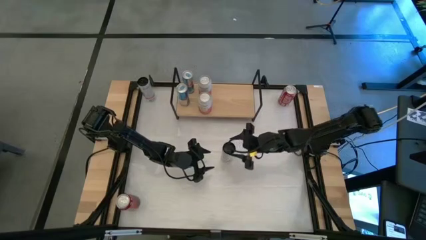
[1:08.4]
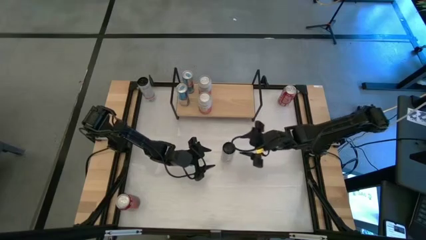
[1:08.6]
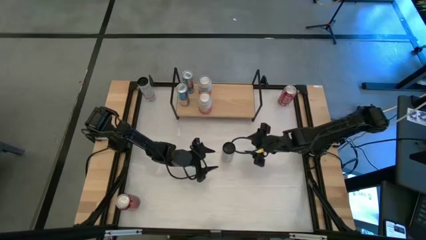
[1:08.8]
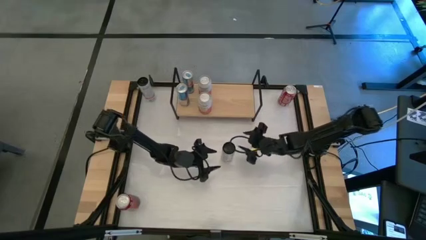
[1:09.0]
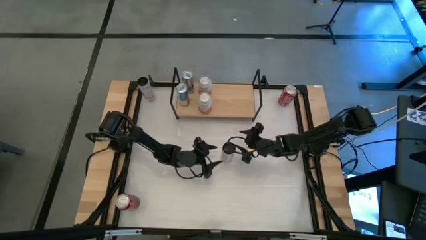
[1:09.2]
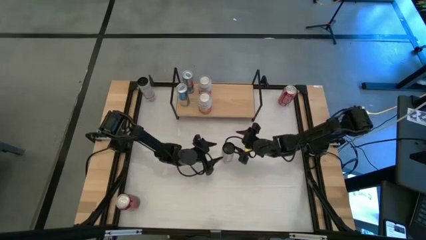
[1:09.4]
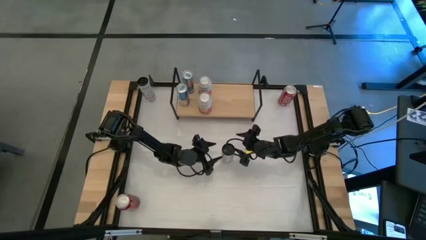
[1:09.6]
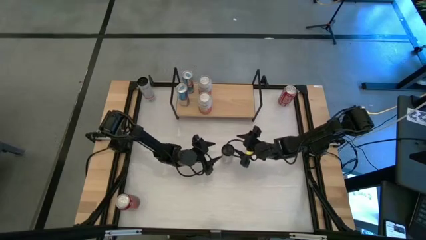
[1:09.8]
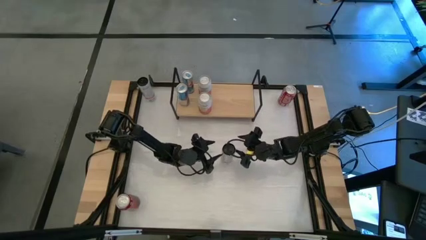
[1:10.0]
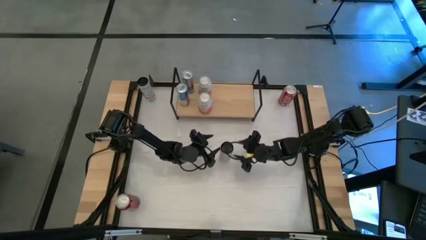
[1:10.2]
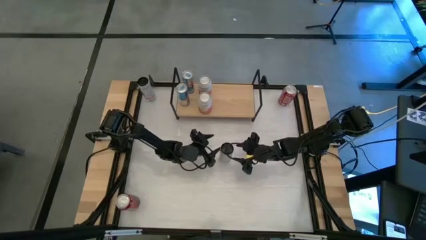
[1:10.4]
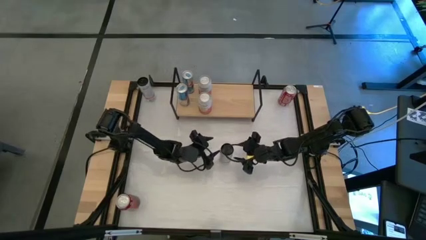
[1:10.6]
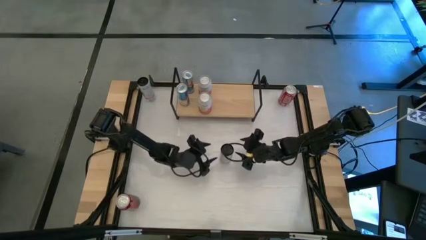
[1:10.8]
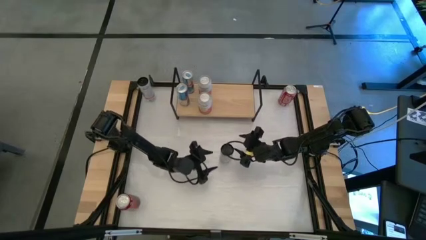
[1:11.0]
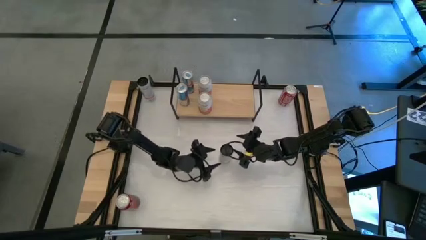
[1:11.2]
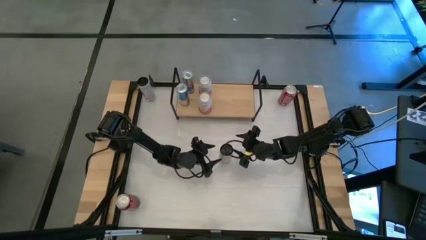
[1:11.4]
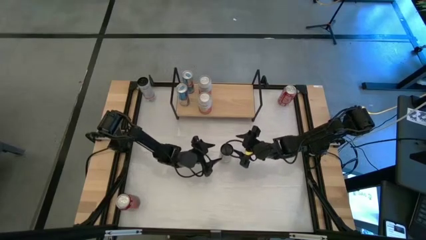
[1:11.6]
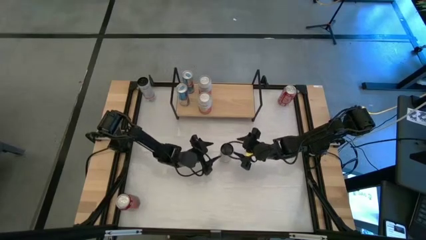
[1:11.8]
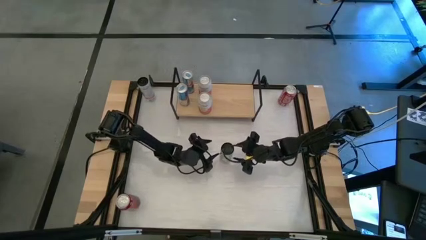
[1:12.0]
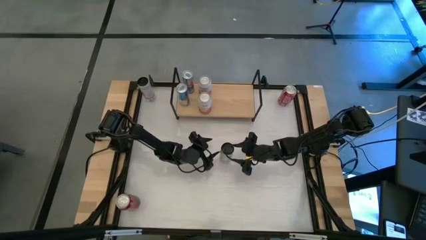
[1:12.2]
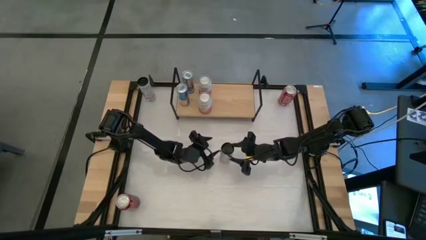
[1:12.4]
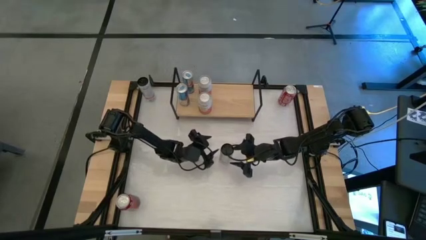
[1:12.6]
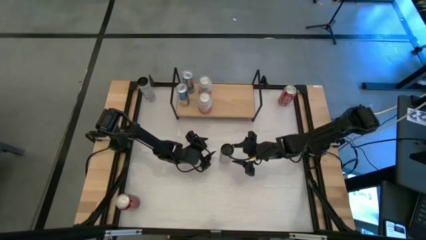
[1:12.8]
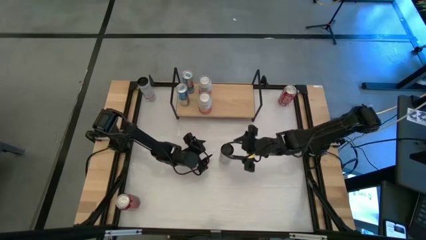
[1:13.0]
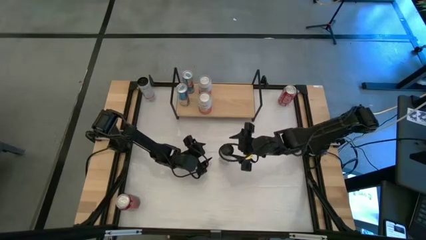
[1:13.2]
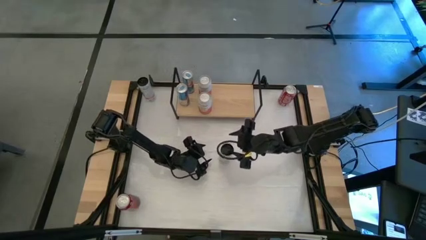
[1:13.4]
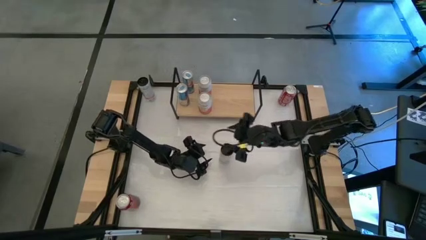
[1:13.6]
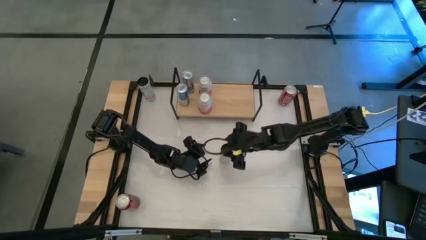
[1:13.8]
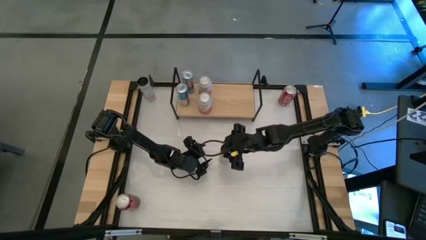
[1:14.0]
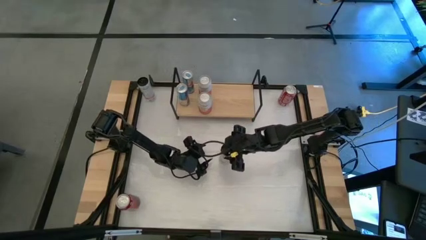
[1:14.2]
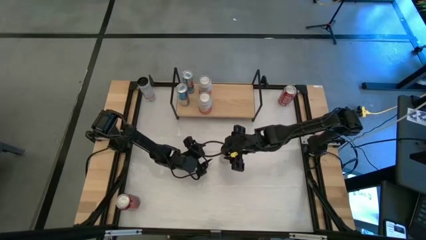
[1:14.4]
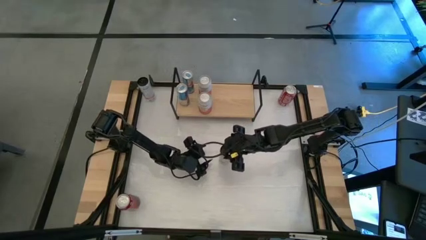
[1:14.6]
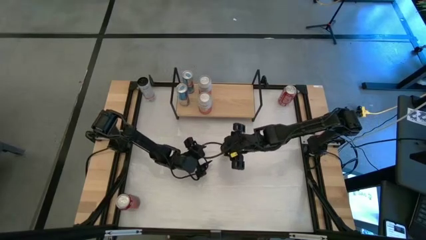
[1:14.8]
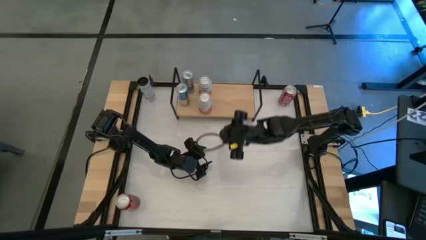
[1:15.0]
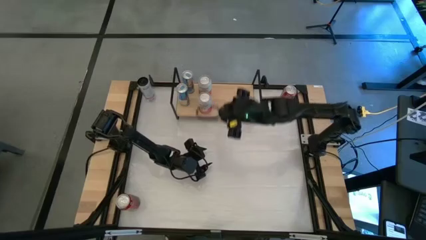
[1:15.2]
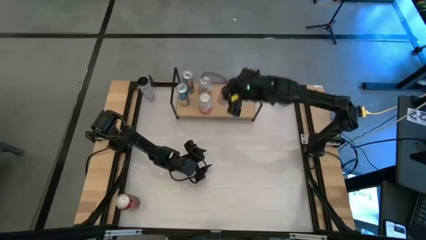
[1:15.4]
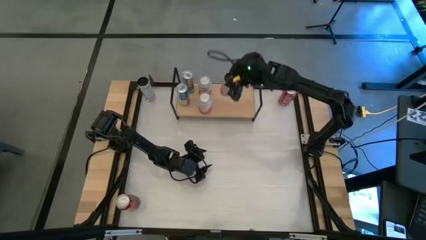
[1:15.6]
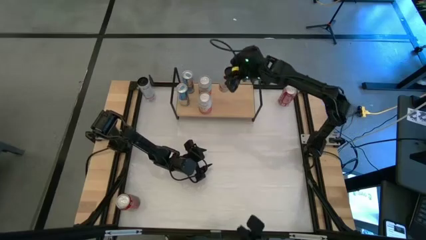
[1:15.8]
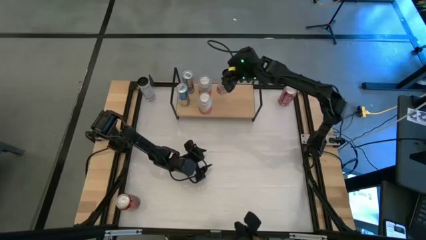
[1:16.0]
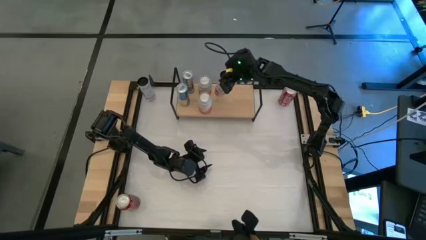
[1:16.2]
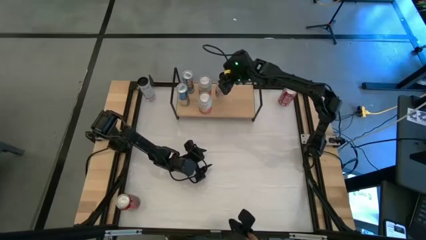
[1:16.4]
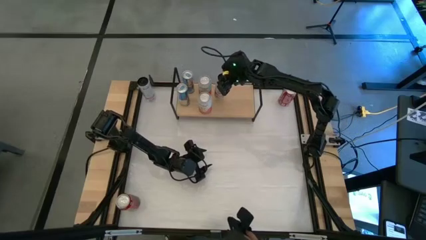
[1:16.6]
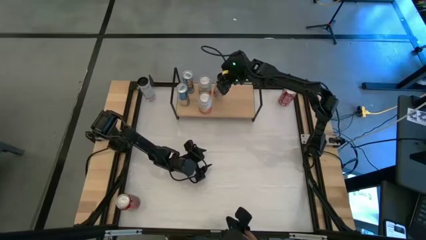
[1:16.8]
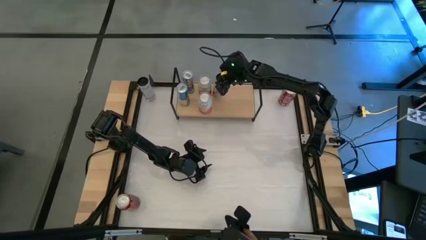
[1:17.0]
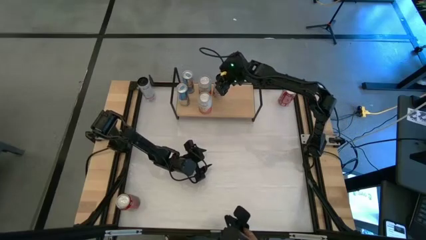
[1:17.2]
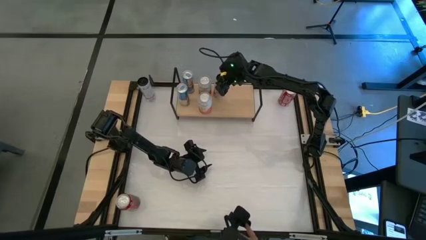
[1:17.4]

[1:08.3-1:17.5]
Task: Place canned beverage on shelf
Put the bottom white and pink soda can on the shelf

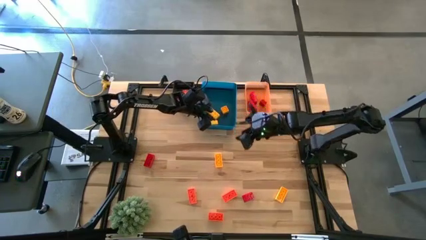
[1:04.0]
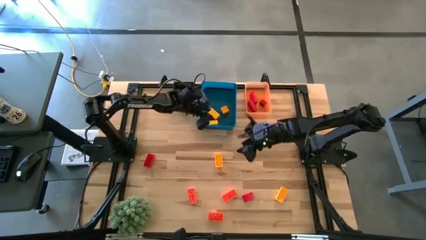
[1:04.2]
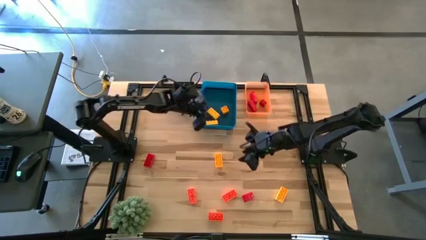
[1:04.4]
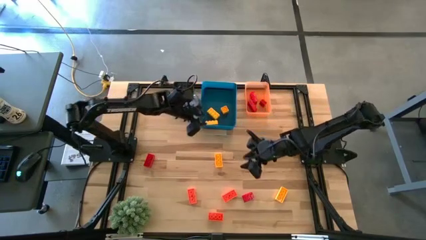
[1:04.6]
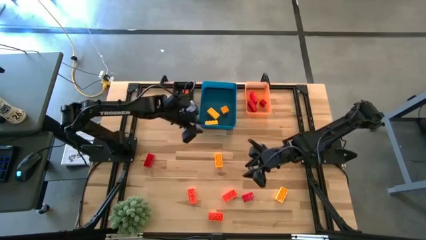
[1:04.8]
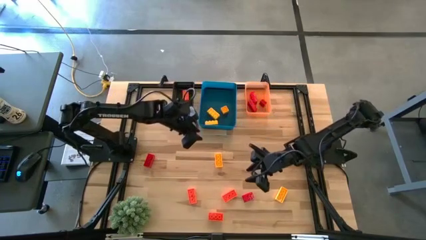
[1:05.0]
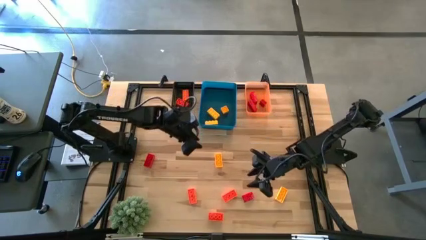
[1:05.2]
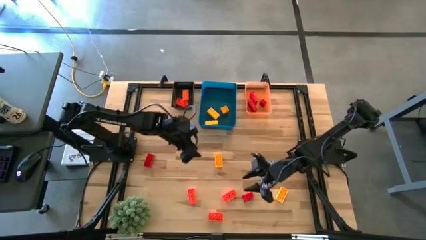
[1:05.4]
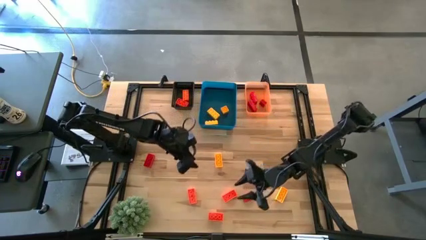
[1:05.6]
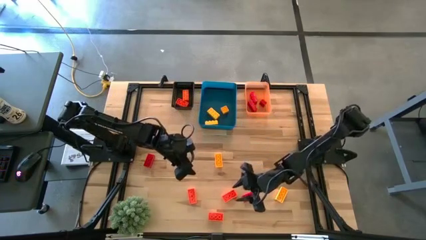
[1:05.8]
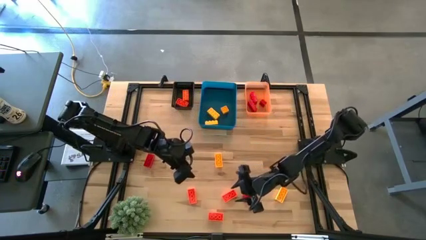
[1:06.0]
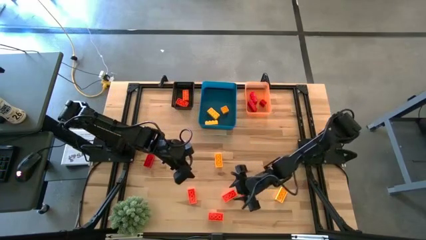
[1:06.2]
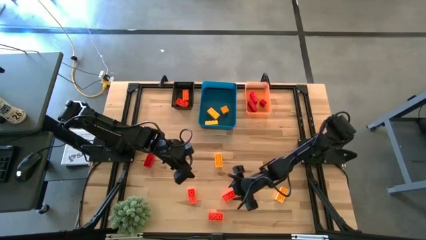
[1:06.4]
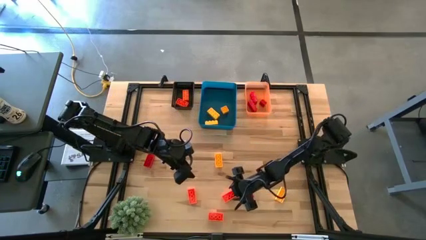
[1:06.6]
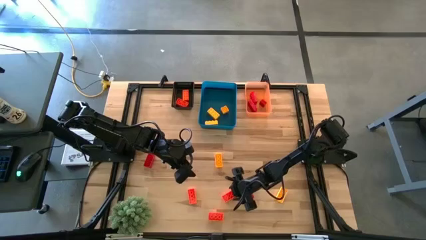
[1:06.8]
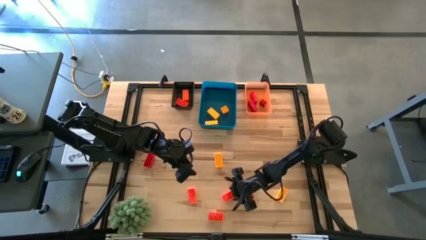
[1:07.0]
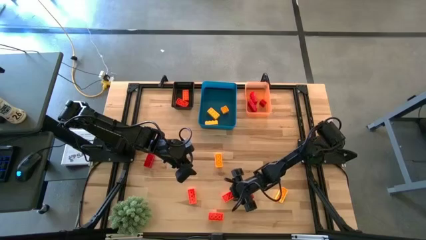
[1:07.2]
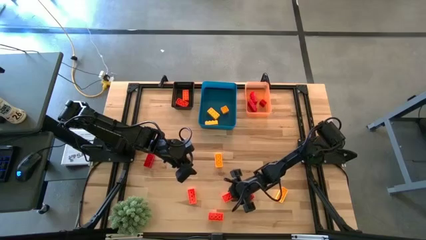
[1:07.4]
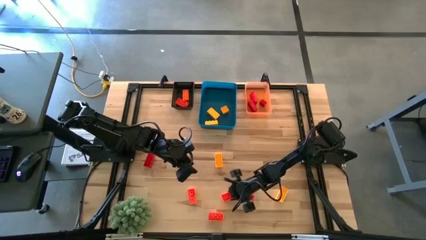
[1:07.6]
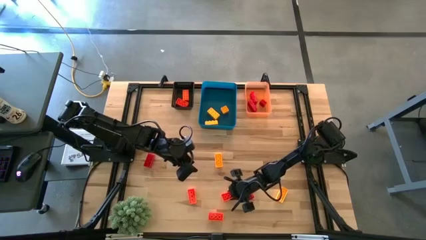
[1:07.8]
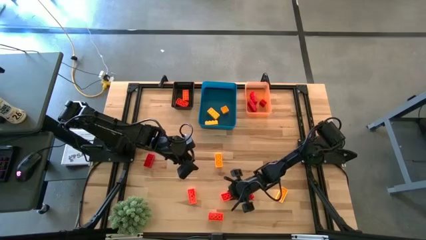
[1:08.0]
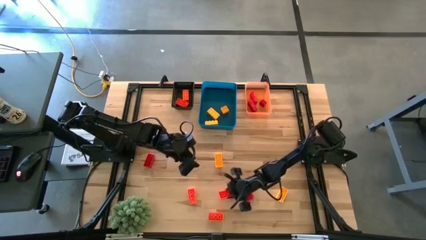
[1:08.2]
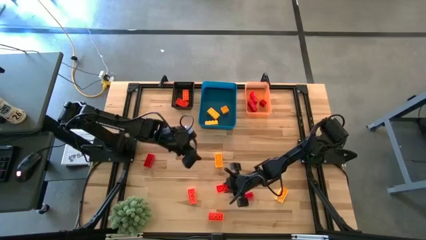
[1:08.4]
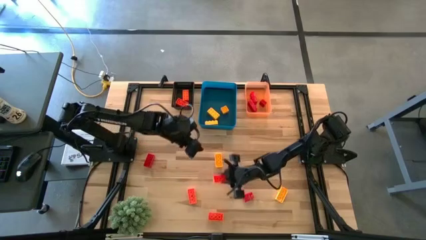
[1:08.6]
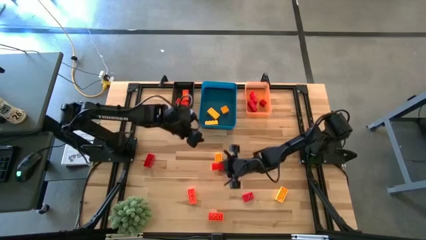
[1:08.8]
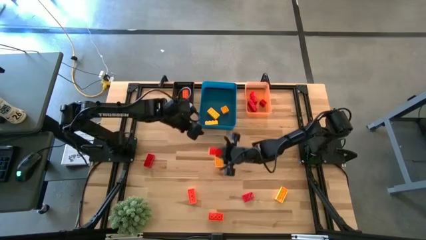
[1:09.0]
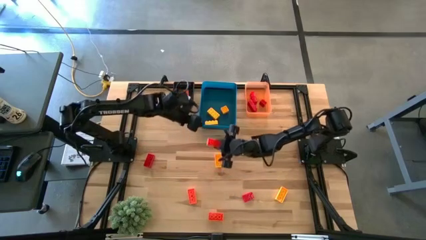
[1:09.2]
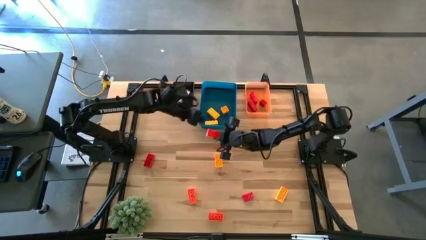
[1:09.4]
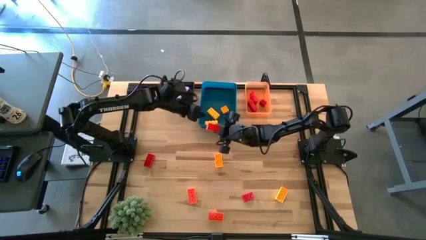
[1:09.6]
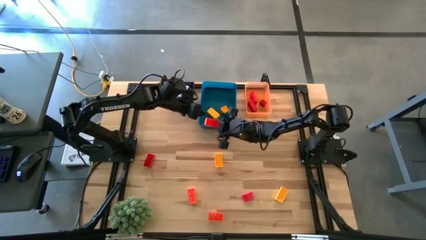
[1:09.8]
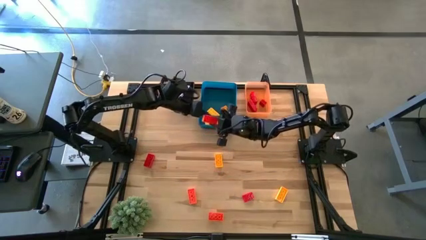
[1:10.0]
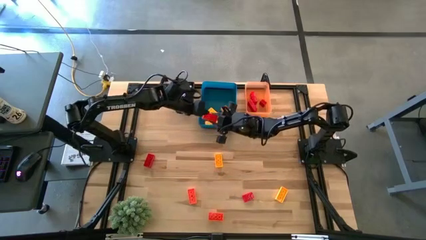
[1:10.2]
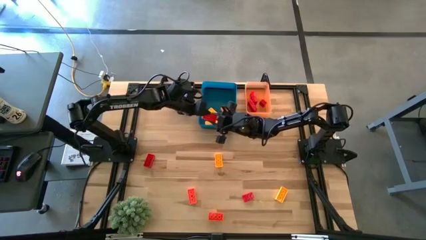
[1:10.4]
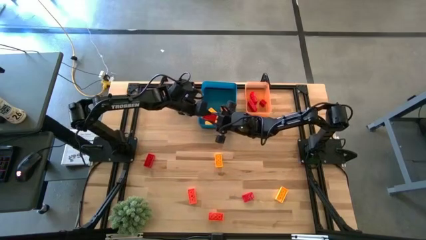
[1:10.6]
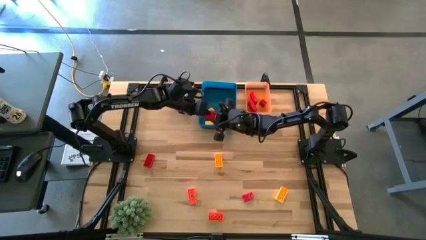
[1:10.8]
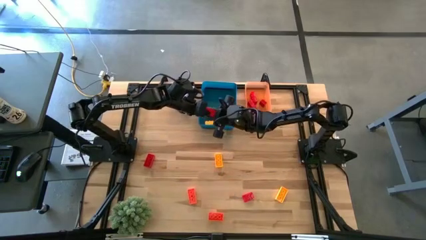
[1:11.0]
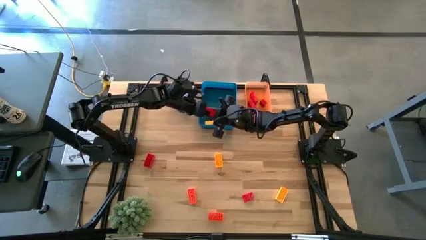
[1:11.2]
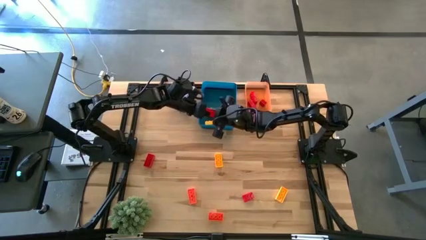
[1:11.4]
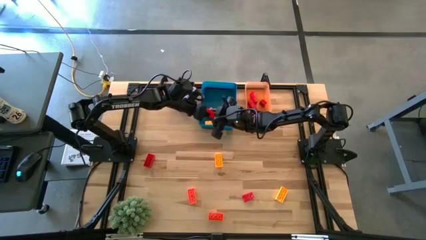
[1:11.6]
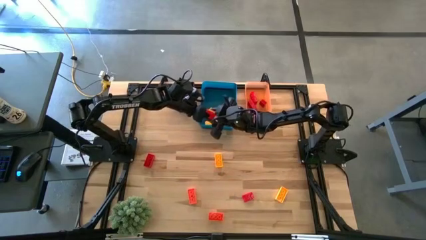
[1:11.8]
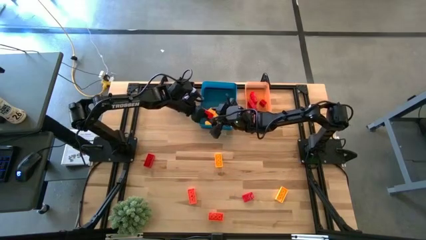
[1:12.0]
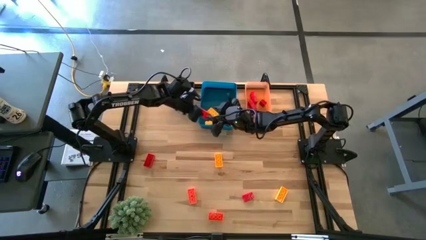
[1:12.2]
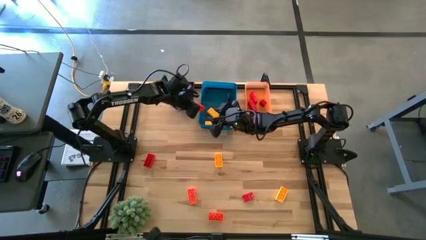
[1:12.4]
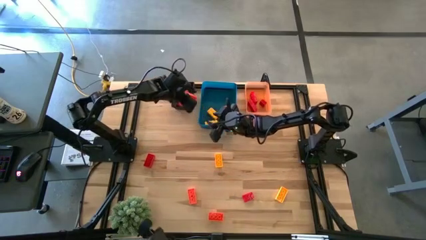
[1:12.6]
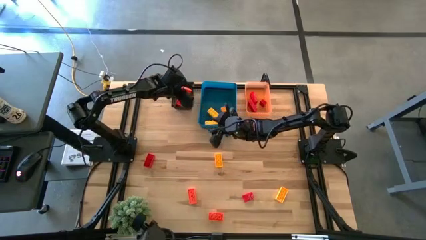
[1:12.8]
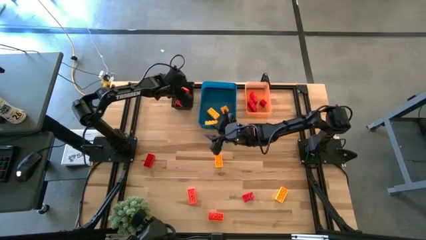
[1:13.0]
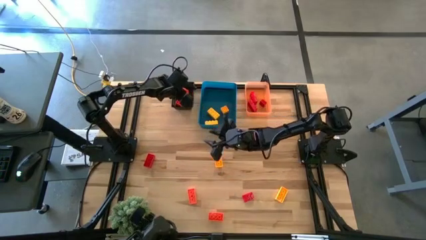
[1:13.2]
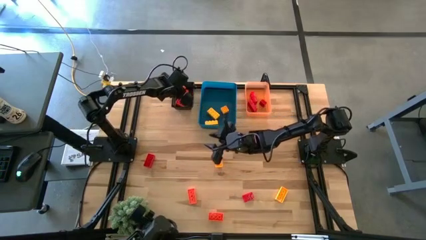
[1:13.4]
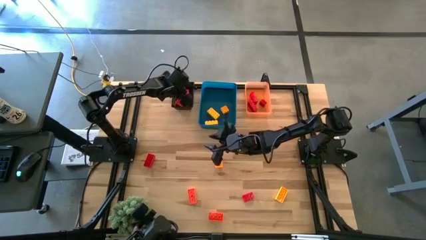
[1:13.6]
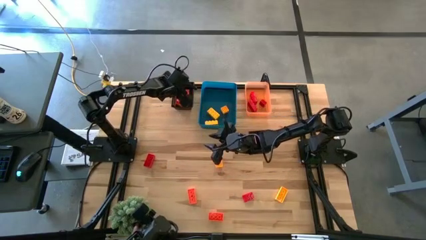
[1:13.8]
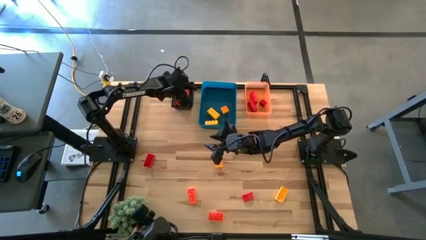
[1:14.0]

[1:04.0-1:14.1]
Task: Sort & place blocks by color
Put the orange game piece into the black bin
